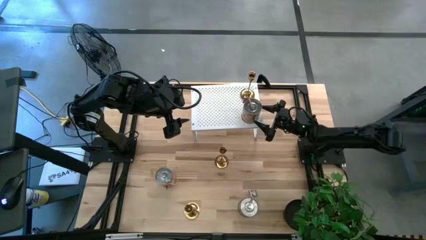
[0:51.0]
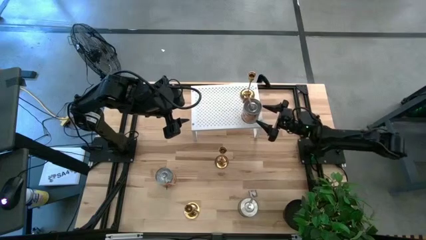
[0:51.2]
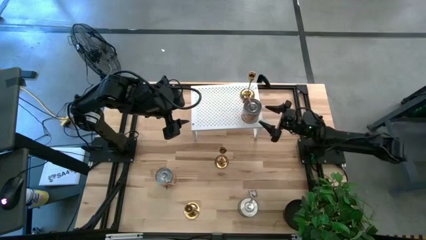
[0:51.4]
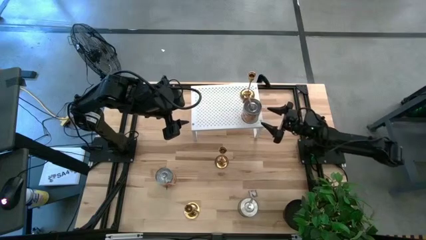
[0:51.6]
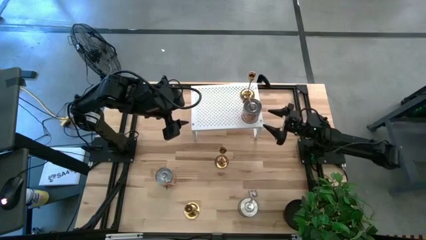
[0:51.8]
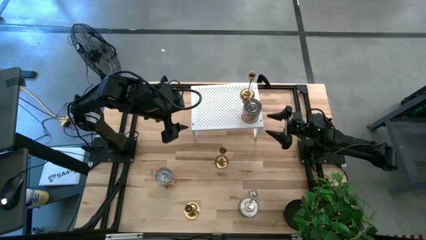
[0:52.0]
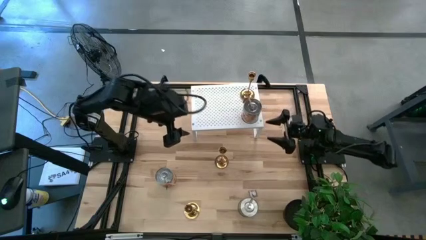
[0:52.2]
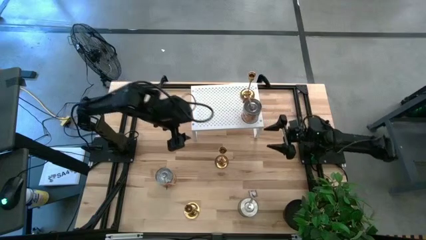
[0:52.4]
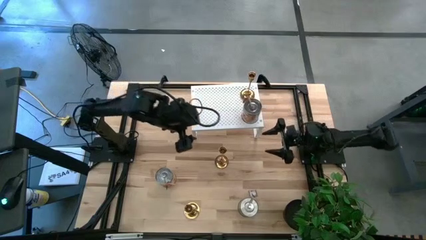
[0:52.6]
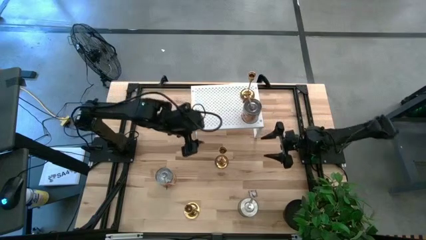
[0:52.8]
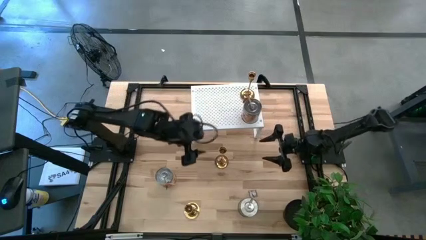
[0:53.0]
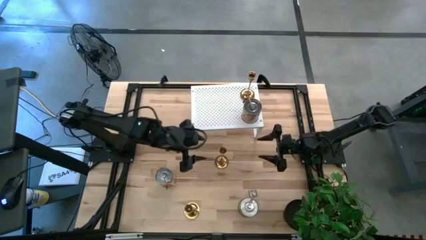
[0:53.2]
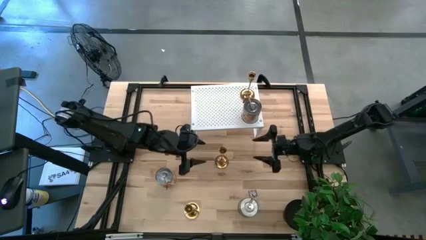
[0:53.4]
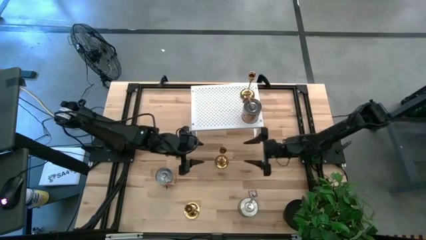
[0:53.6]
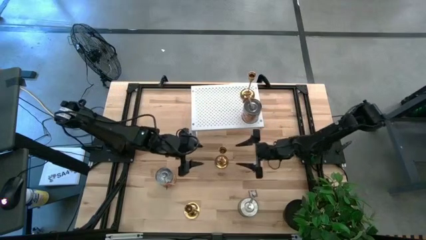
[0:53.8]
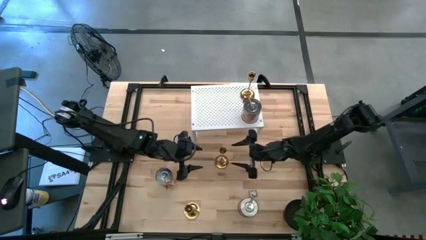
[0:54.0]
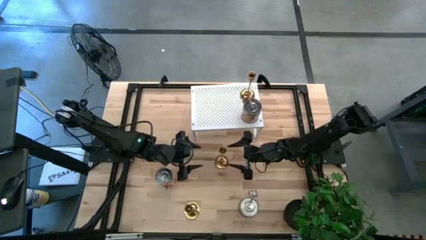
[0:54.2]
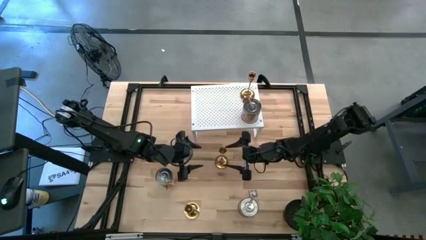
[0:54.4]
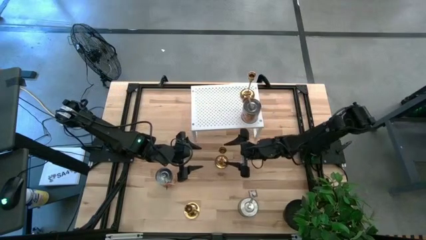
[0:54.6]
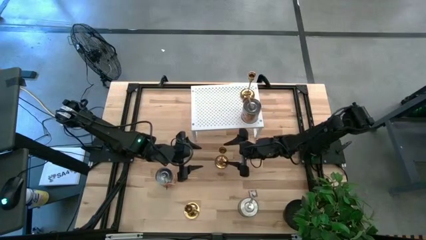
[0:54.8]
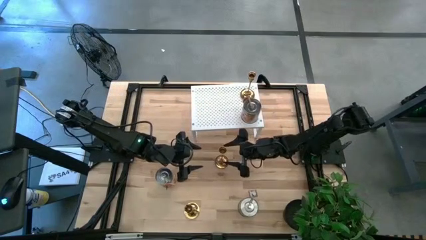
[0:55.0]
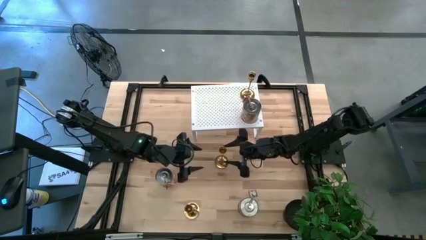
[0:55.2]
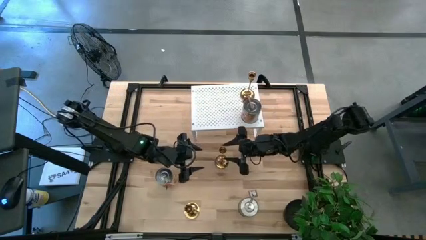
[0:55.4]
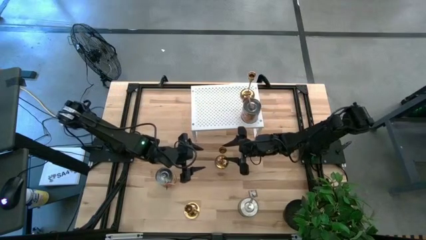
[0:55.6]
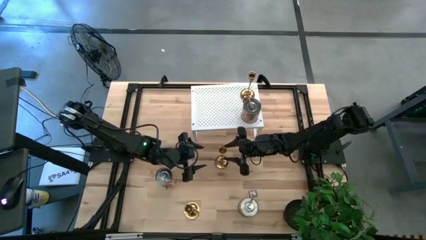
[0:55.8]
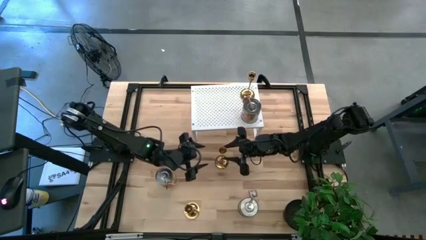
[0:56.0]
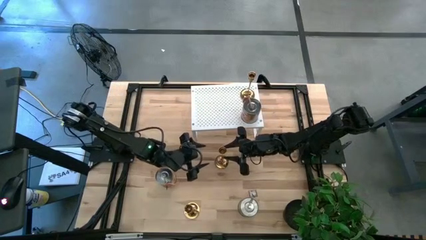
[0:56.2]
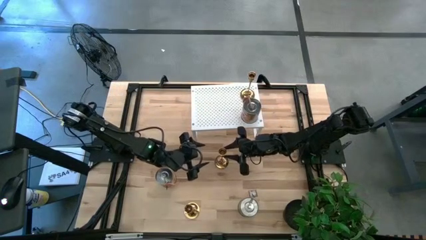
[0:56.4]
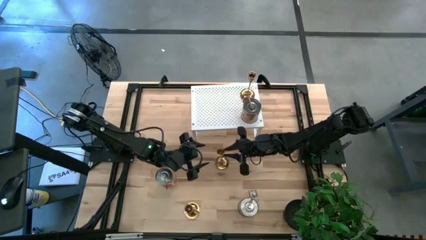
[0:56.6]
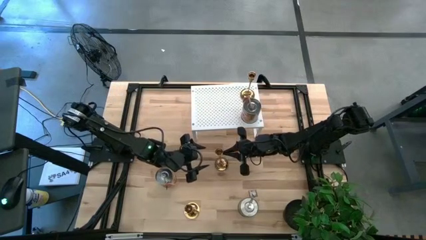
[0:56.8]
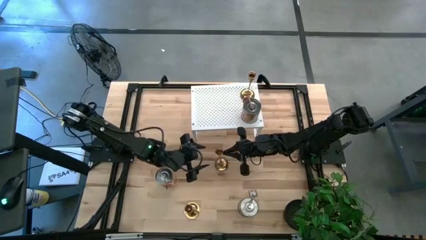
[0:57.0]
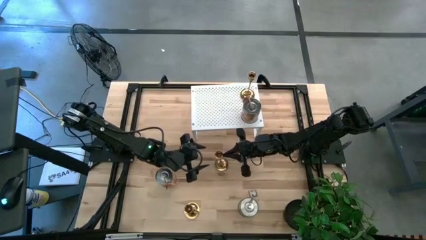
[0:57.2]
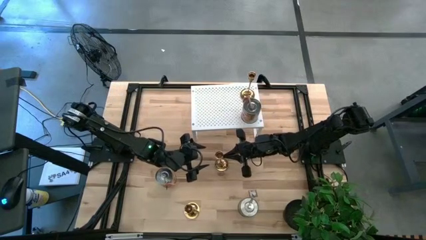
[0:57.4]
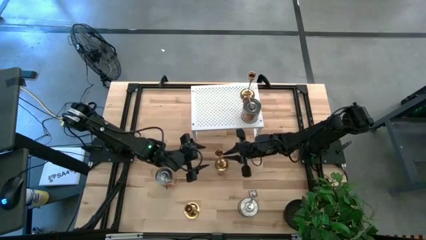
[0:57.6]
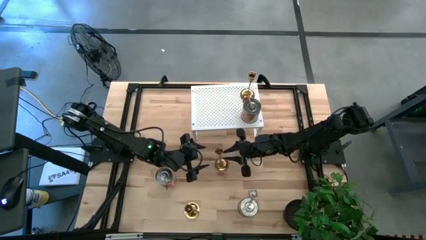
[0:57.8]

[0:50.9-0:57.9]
Task: Pick & Place candle stick holders
Put the top gold candle holder on the shelf aligned with the other gold candle holder

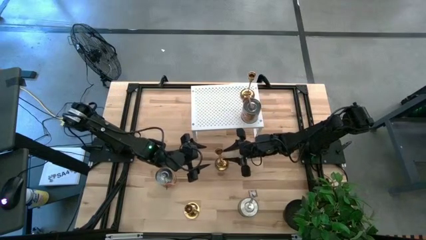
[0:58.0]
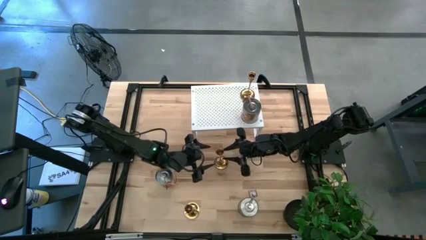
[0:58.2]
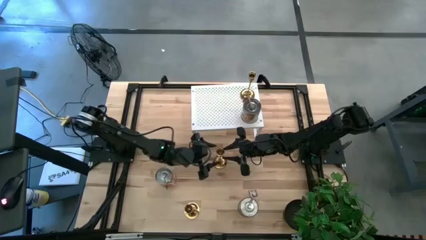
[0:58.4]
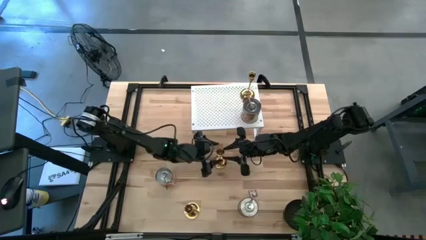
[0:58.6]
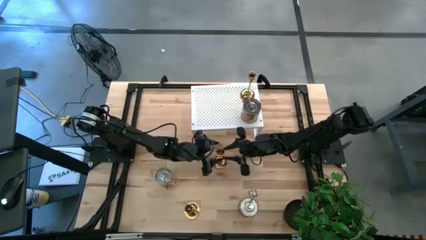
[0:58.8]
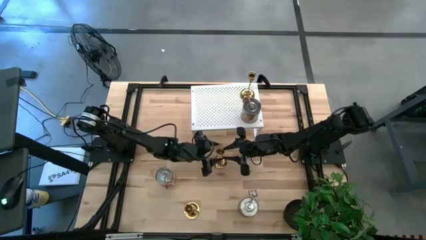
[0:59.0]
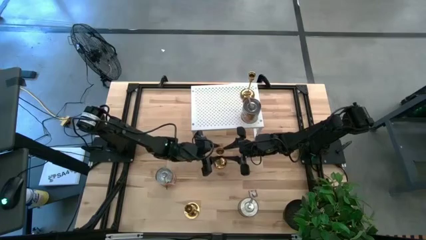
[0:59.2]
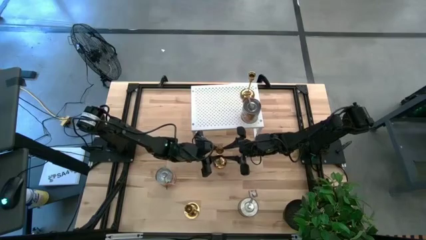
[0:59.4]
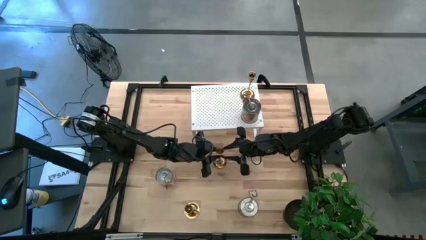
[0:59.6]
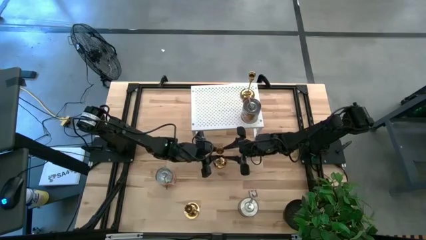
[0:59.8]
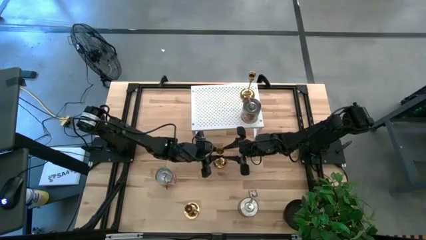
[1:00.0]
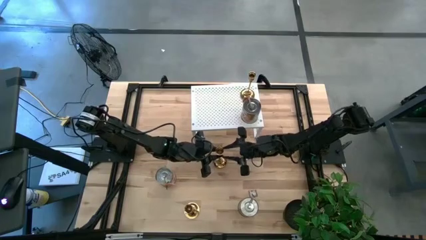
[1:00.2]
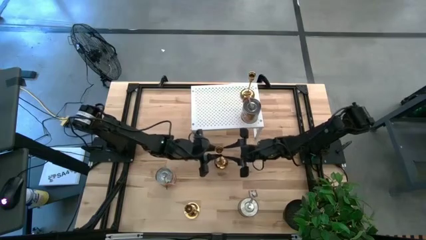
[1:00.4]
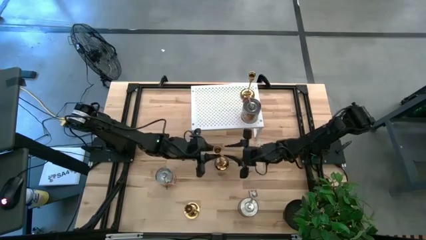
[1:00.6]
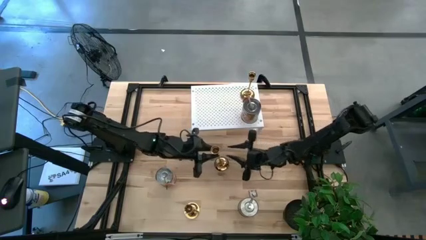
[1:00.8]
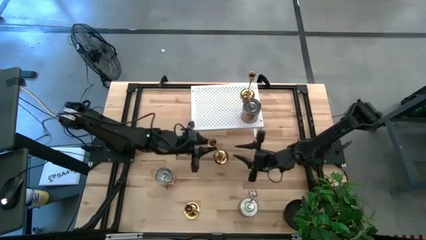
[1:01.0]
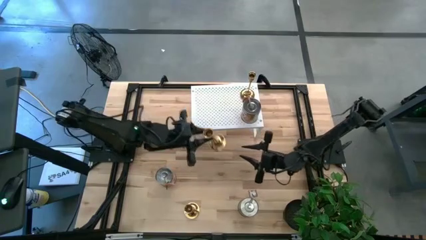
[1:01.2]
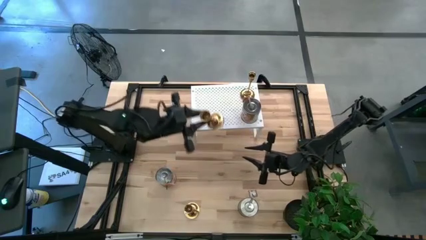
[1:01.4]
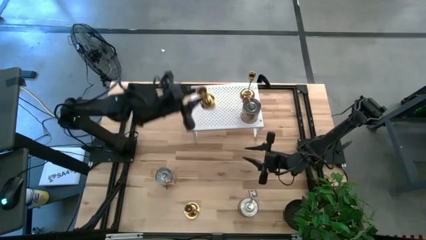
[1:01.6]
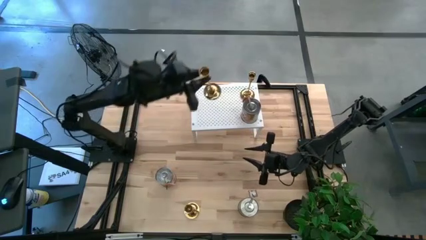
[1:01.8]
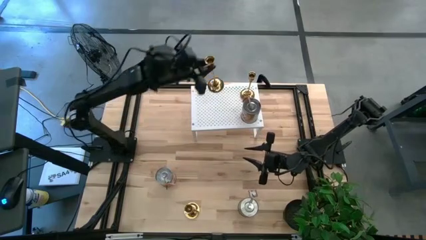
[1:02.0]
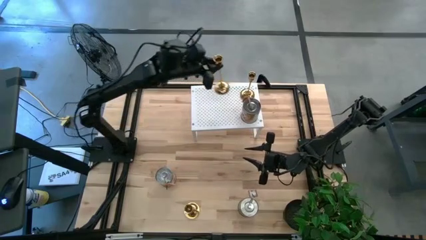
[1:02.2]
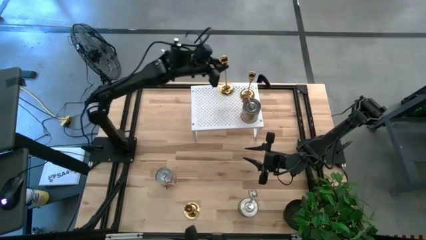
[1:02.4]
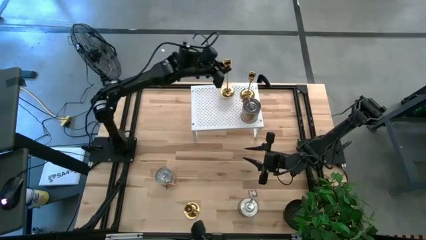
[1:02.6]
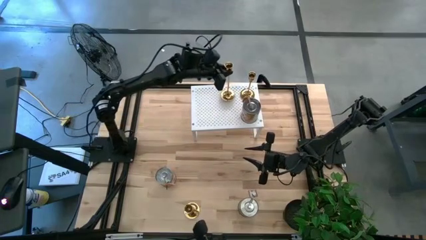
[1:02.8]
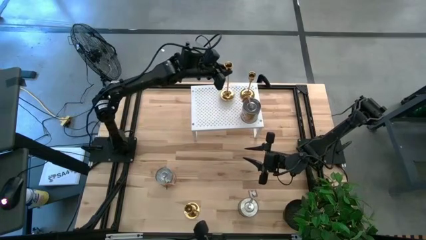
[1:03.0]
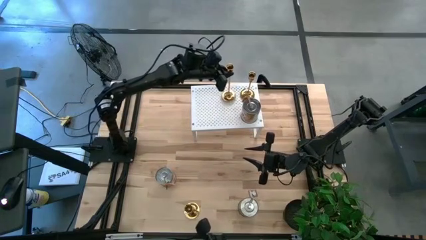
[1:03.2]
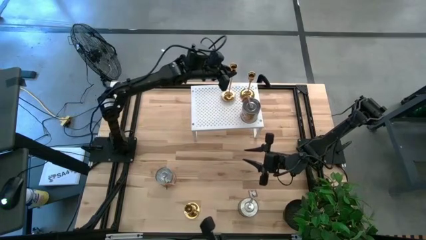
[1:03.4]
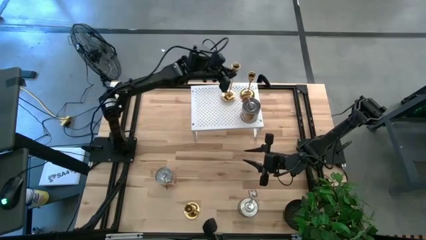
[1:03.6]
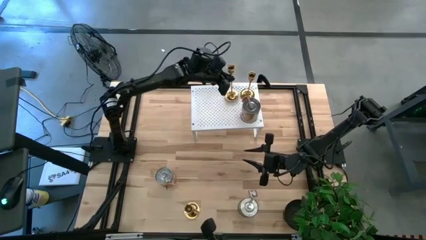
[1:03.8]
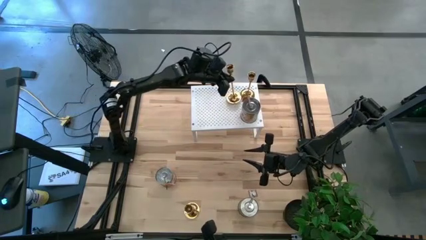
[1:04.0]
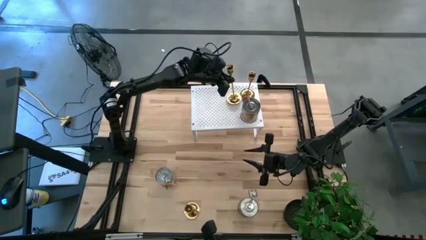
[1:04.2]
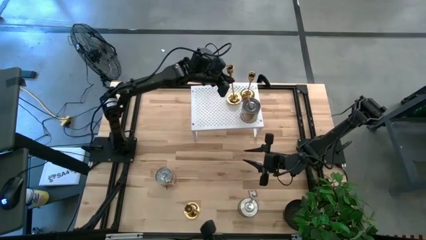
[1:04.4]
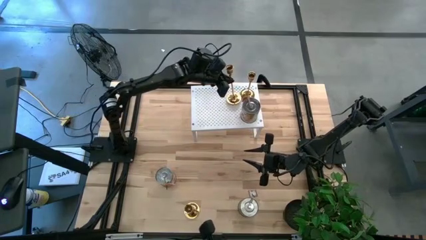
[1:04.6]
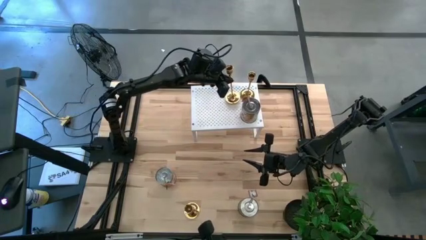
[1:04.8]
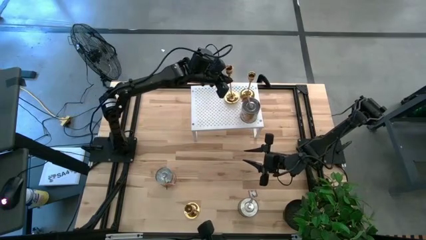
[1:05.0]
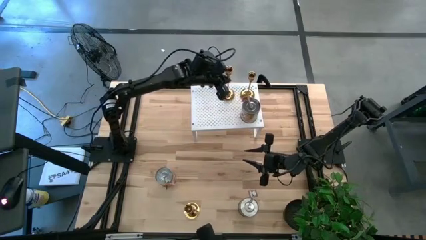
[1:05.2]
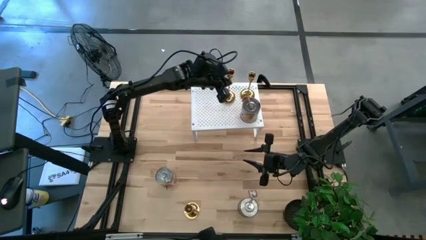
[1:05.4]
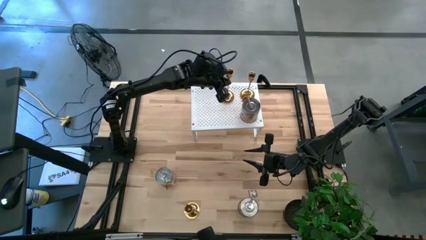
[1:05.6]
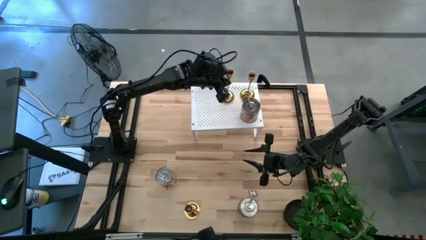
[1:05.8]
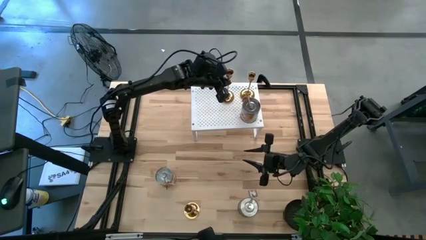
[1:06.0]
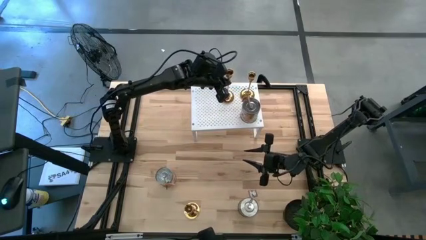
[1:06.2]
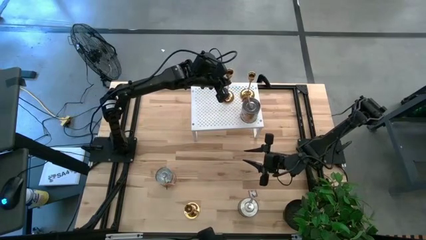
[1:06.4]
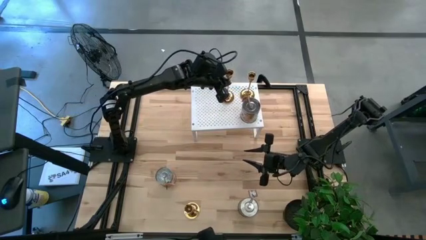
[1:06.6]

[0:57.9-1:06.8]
Put the top gold candle holder on the shelf aligned with the other gold candle holder

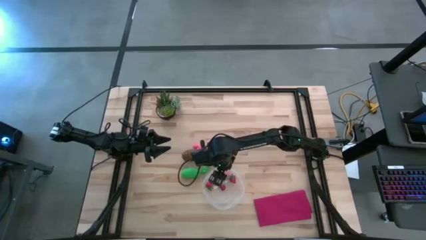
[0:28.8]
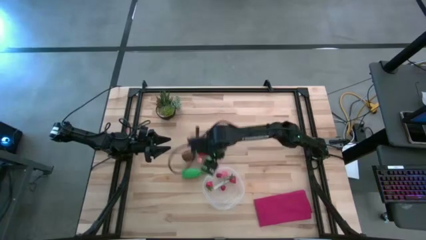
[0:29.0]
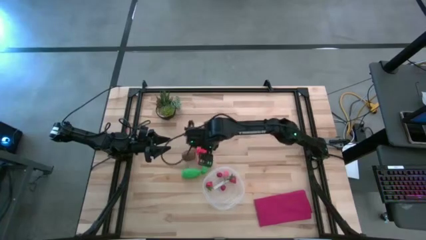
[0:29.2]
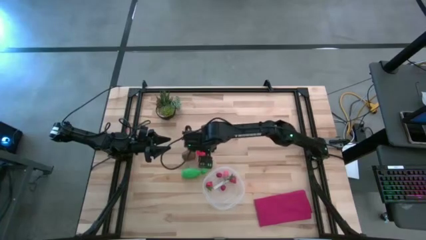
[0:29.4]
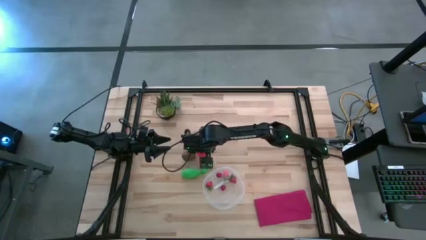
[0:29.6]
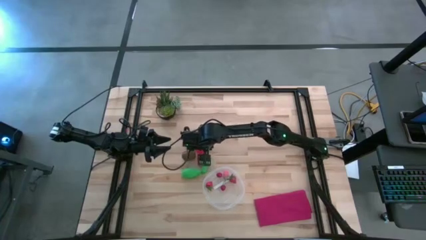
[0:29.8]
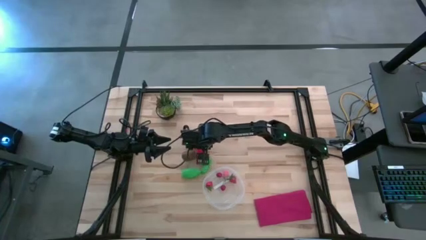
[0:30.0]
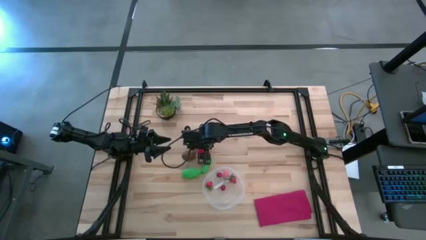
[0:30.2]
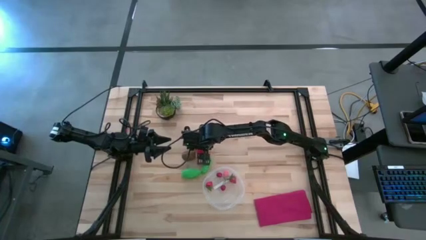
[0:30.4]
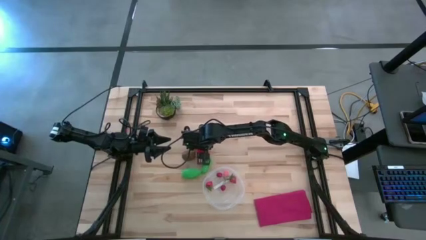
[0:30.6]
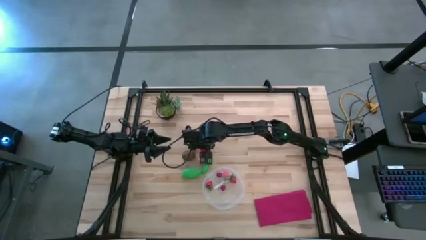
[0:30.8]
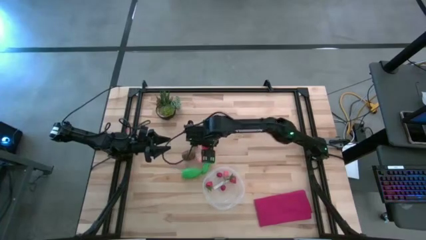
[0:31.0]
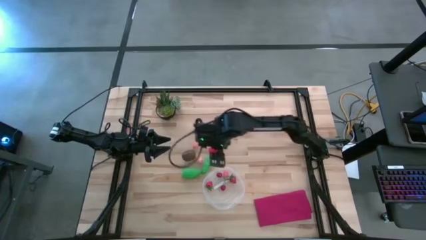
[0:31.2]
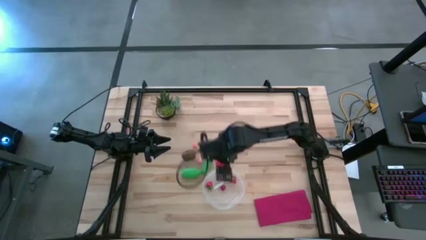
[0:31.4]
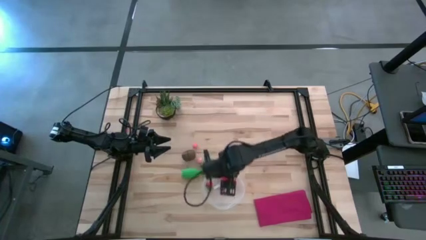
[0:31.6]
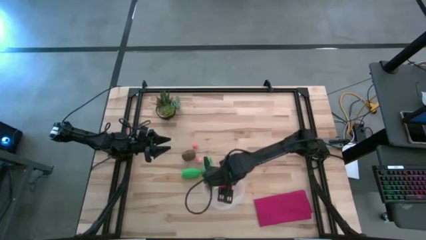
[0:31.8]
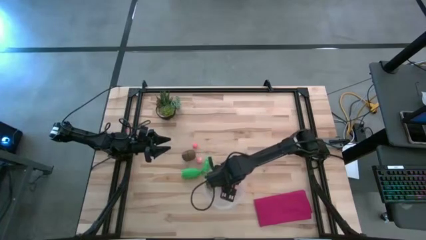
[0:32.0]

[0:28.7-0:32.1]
Task: Pick and placing Produce into tupperware
Put the red tomato into the transparent bin
